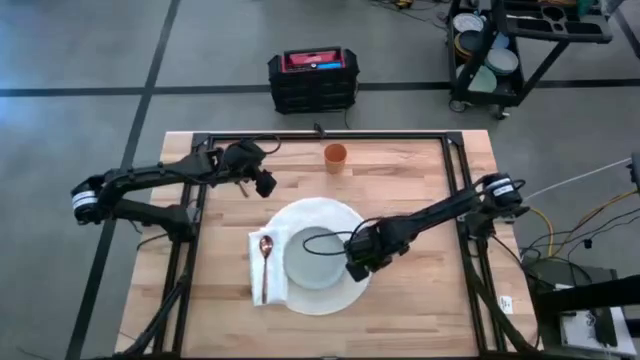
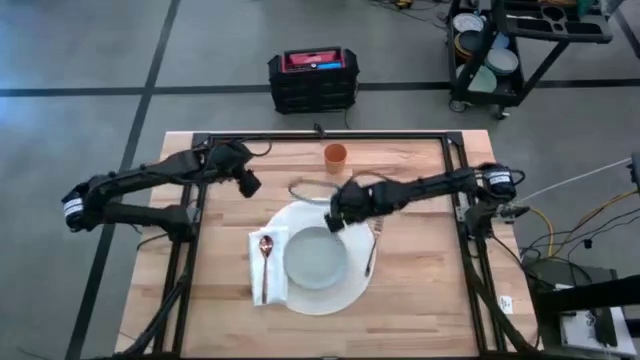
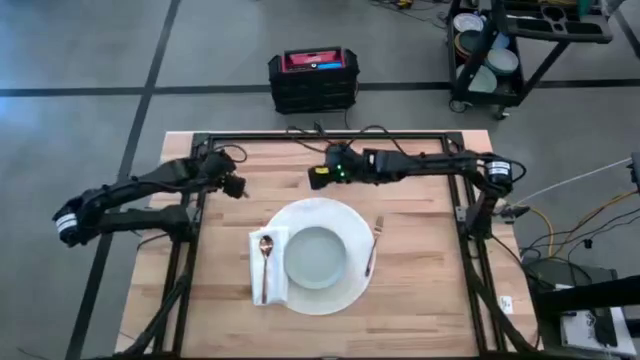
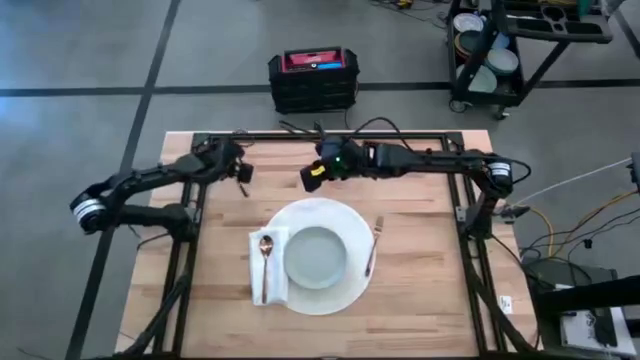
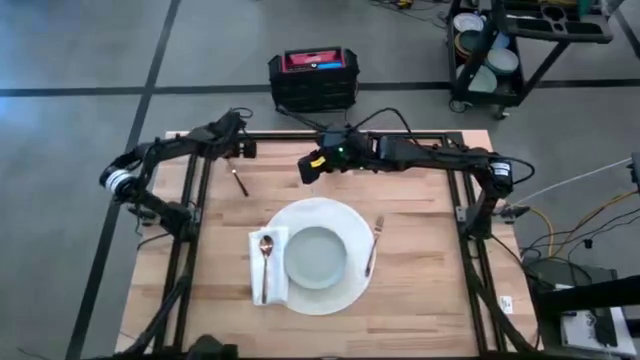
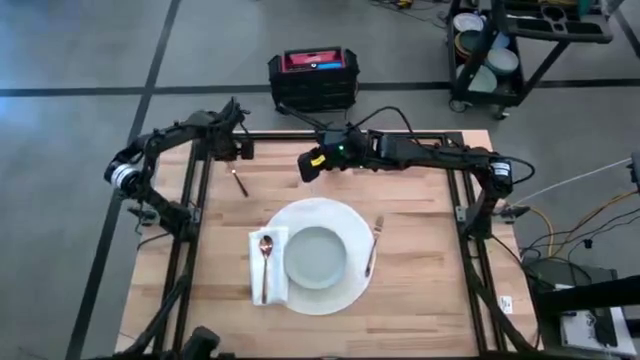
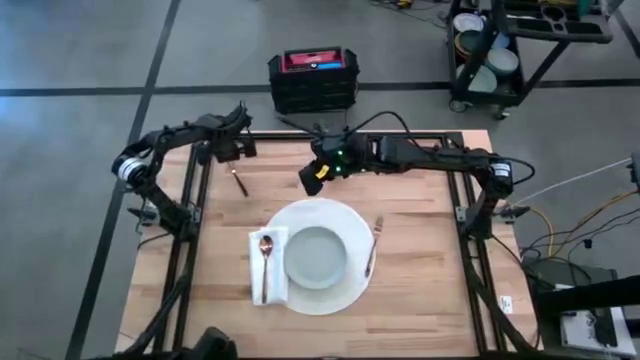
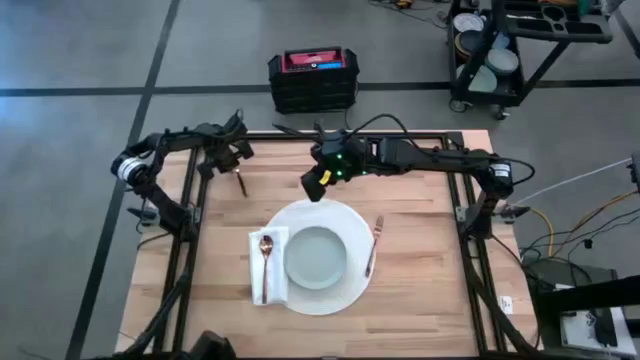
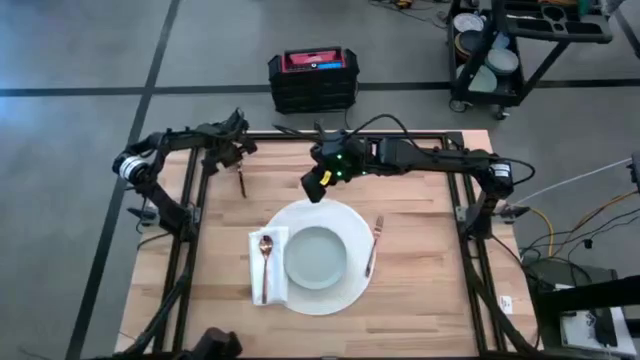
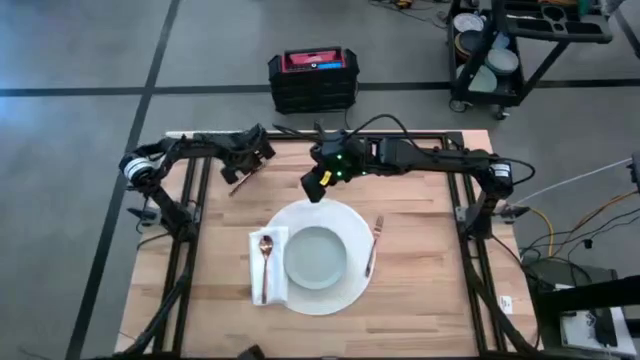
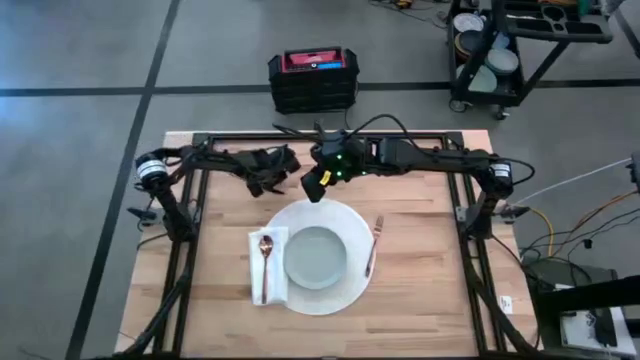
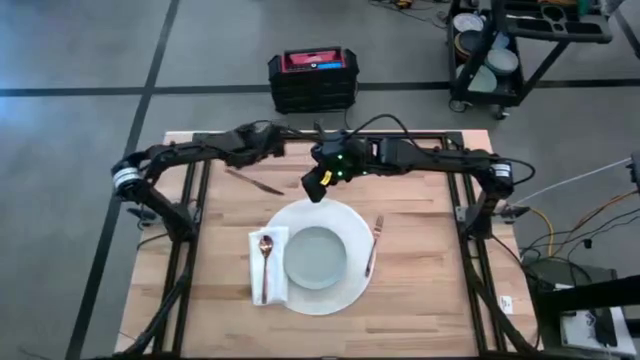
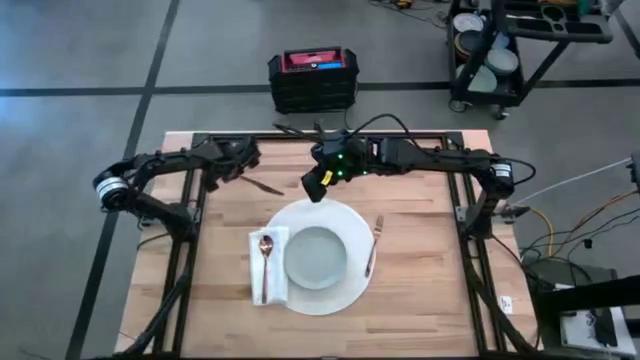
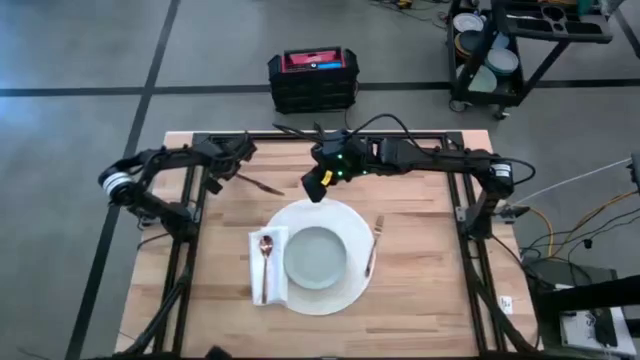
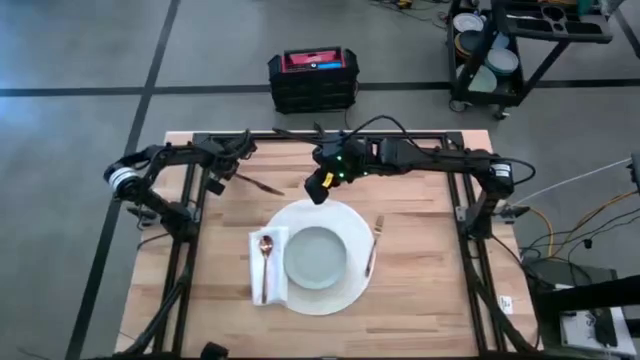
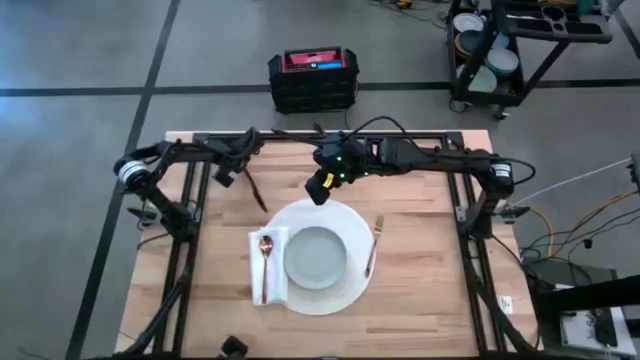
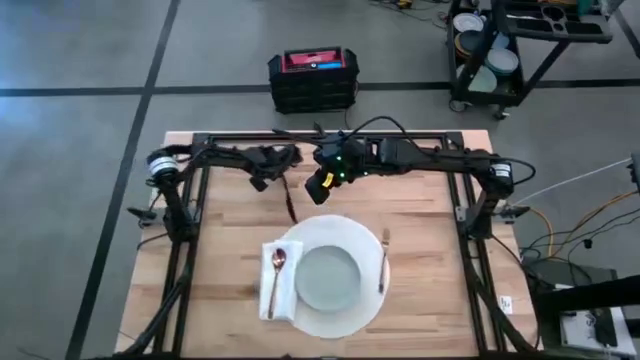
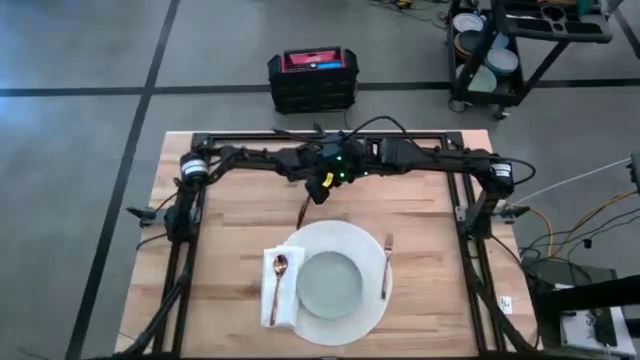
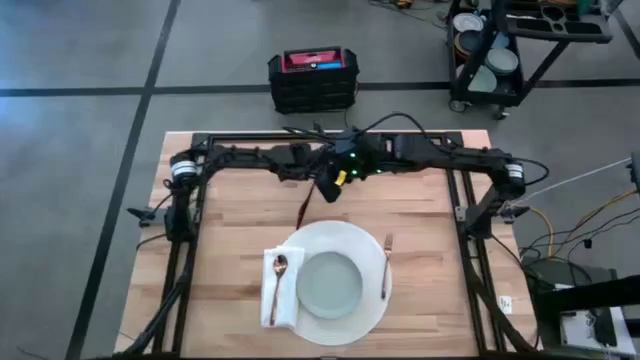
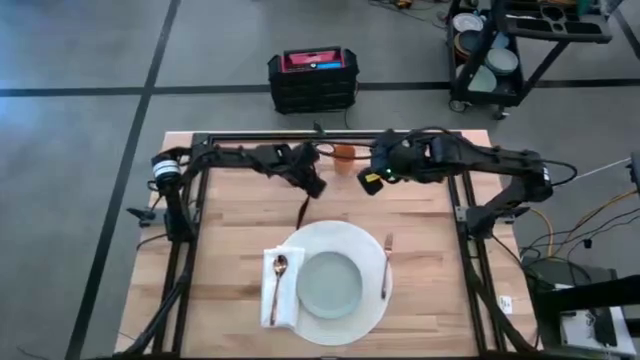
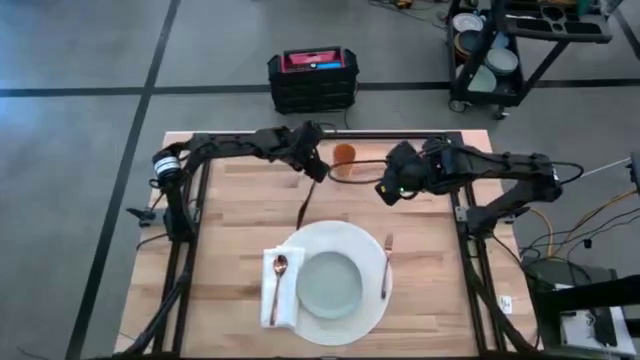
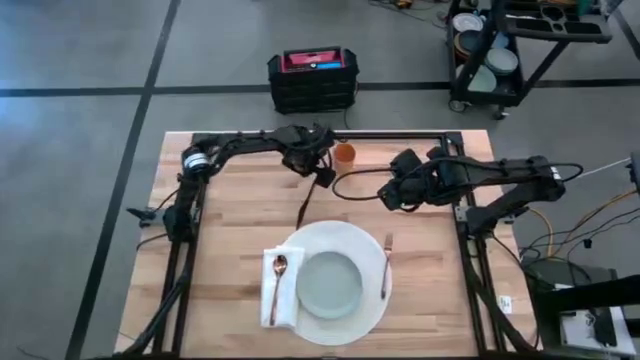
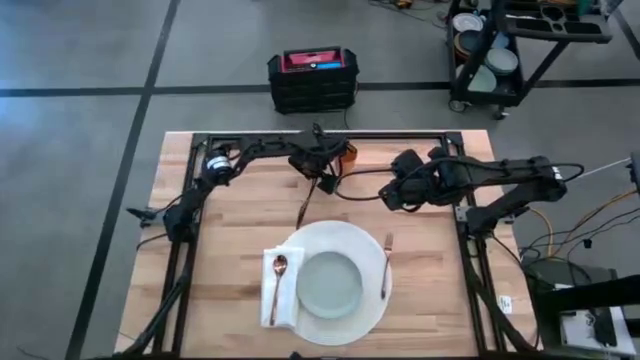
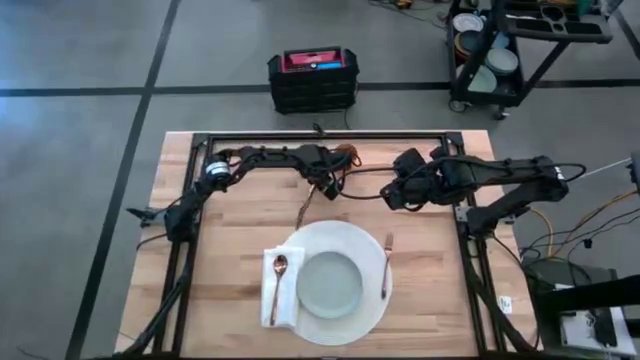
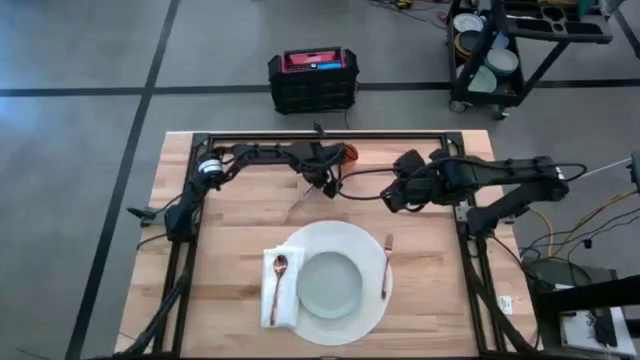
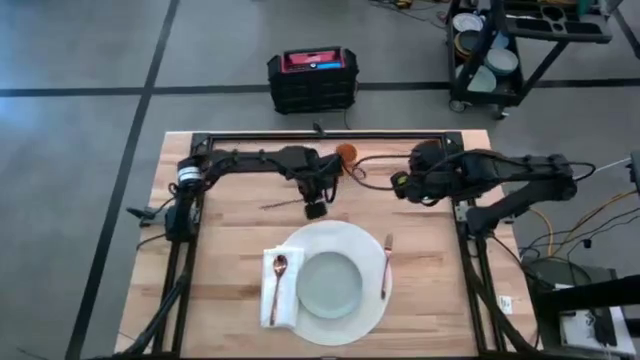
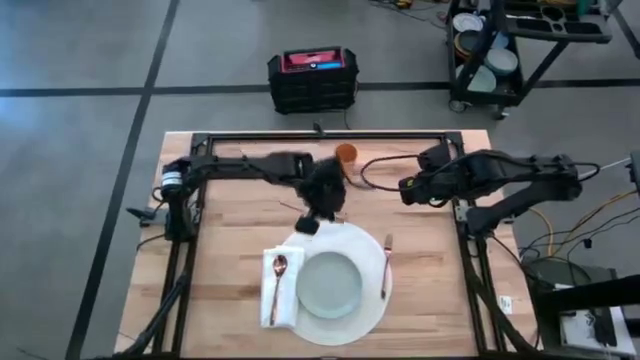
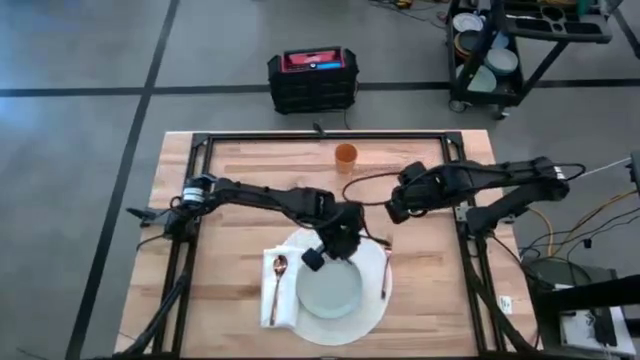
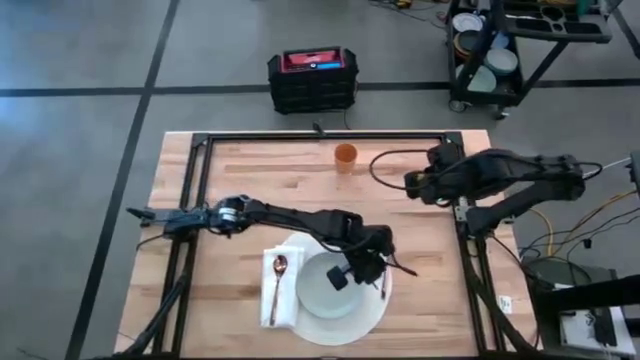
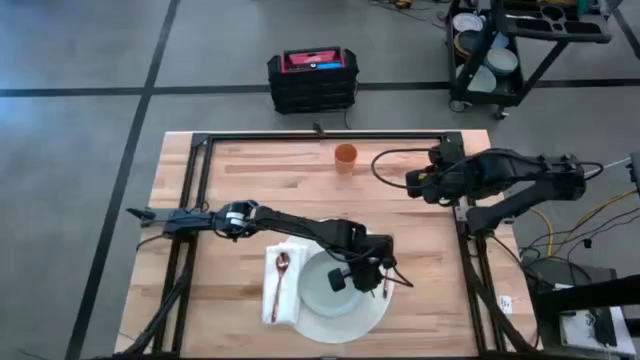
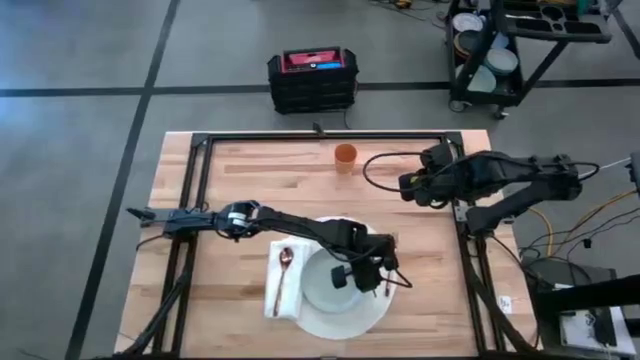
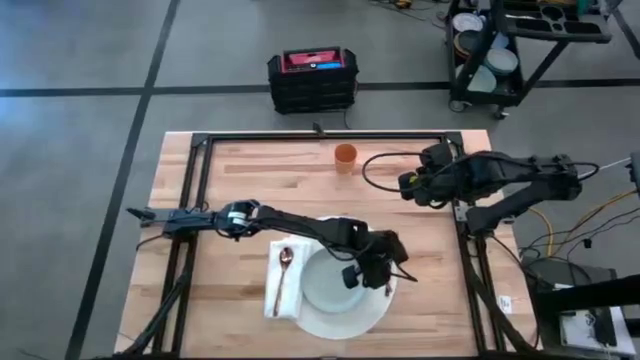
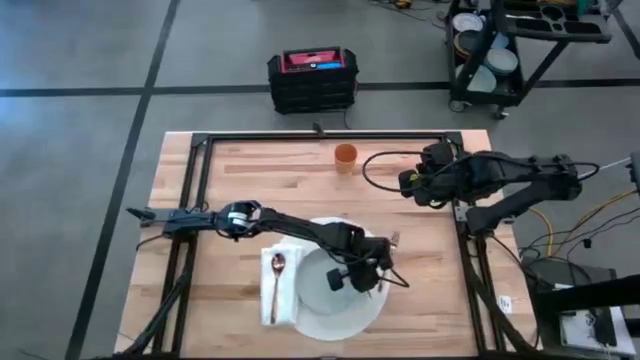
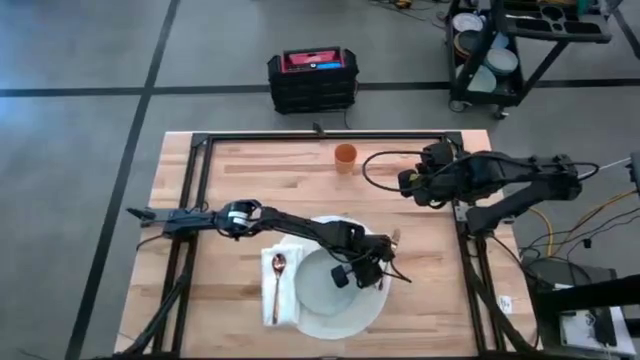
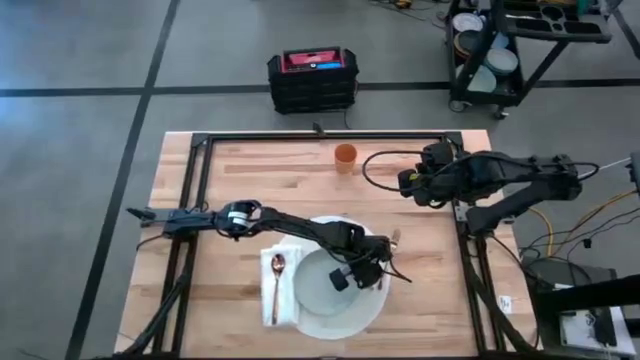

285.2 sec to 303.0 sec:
Task: Set table place
Put the gold knife on the white mat

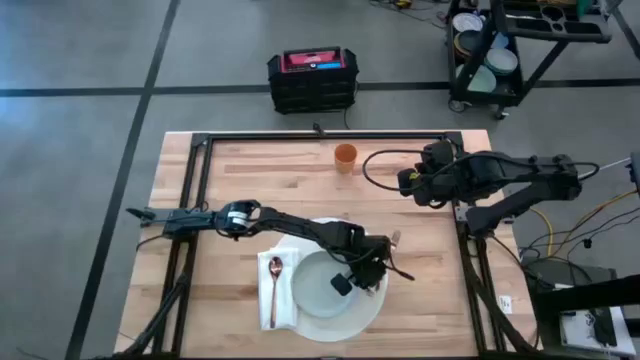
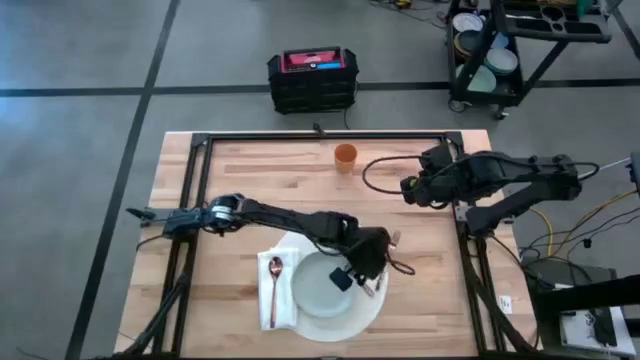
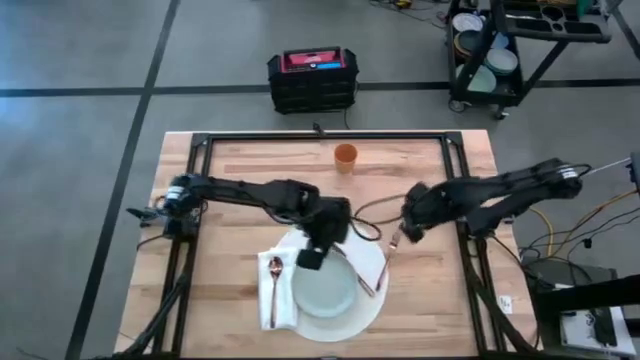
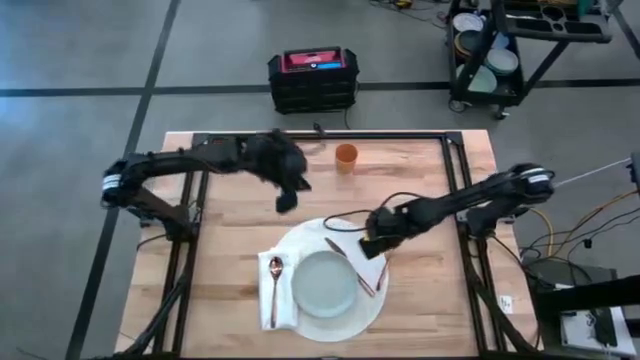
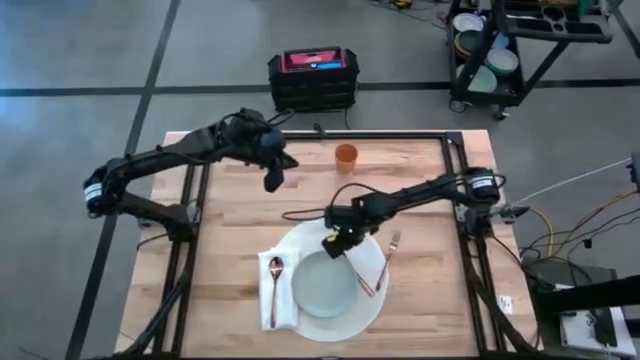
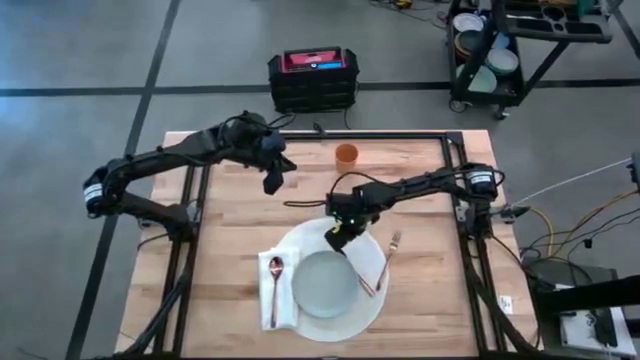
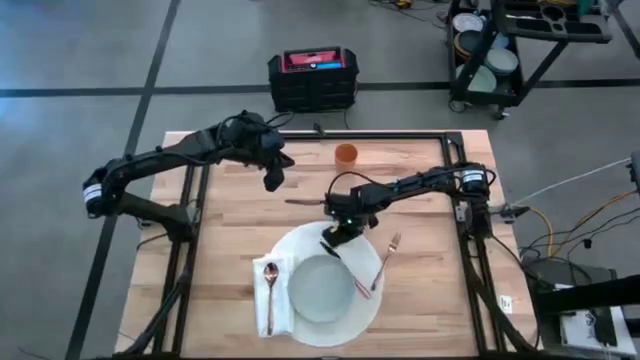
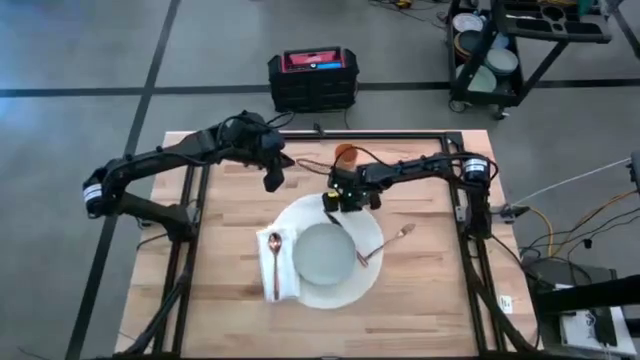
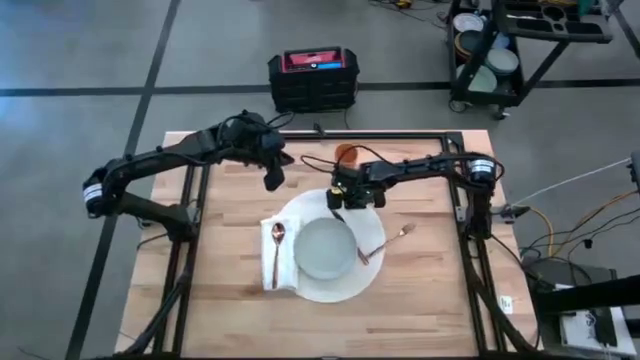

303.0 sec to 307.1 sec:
Adjust the white mat on the table
